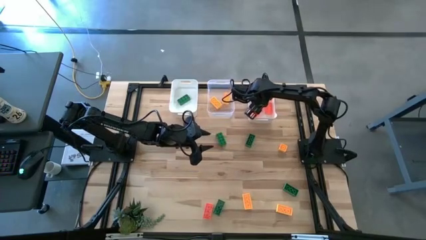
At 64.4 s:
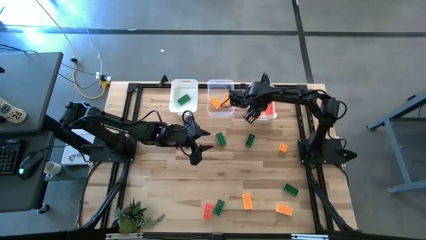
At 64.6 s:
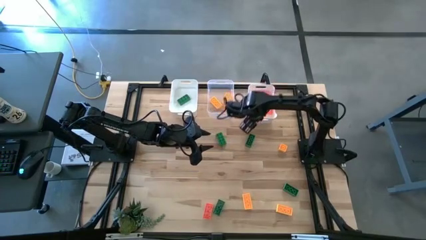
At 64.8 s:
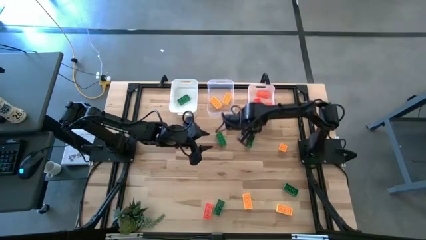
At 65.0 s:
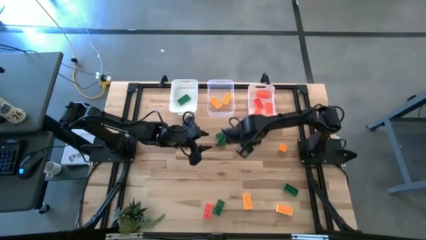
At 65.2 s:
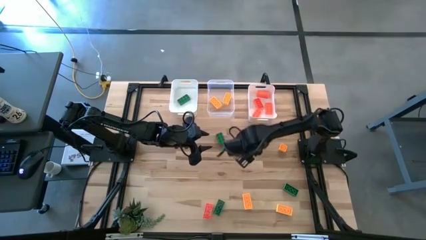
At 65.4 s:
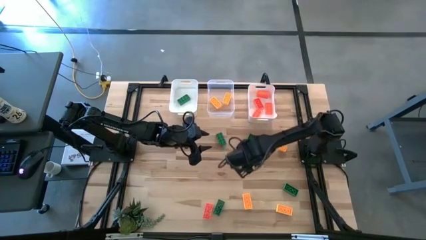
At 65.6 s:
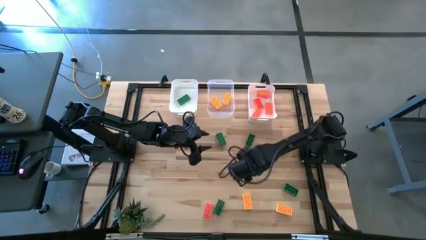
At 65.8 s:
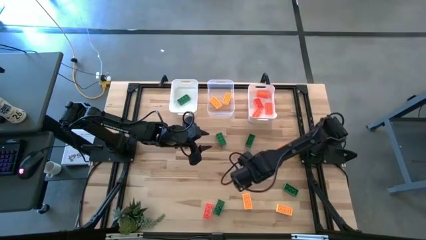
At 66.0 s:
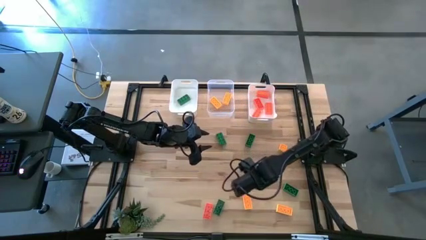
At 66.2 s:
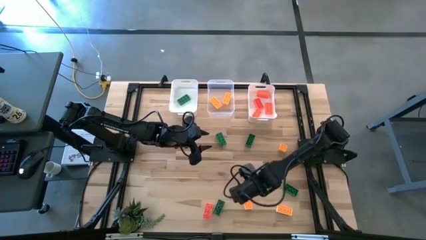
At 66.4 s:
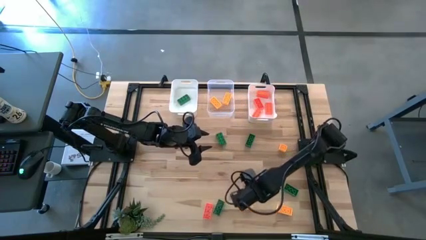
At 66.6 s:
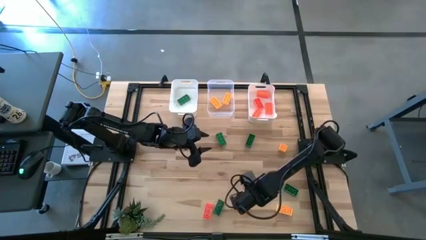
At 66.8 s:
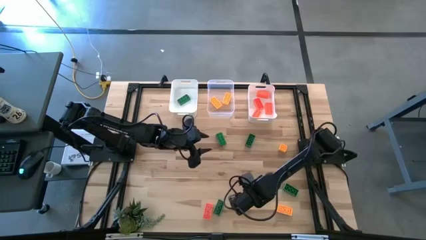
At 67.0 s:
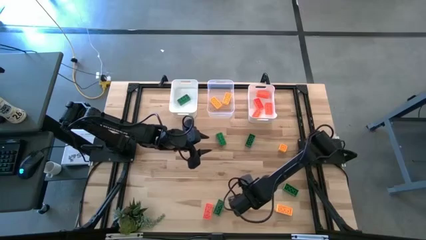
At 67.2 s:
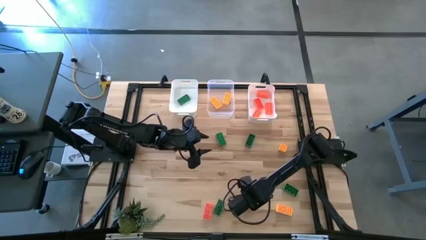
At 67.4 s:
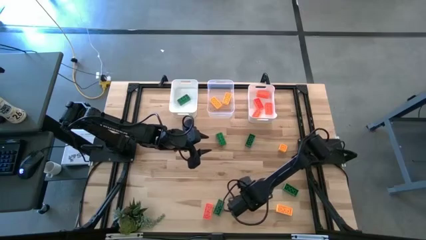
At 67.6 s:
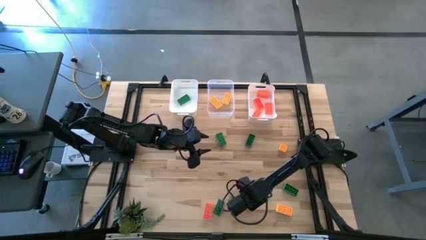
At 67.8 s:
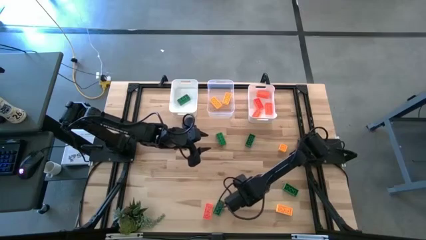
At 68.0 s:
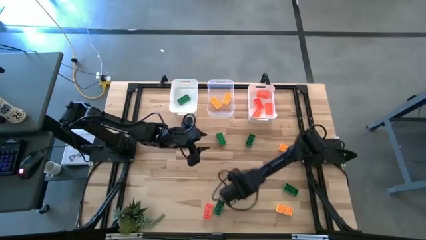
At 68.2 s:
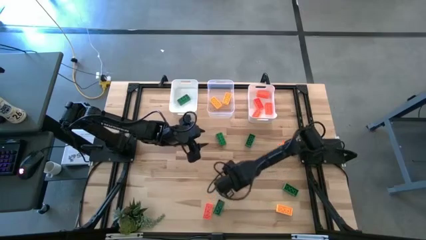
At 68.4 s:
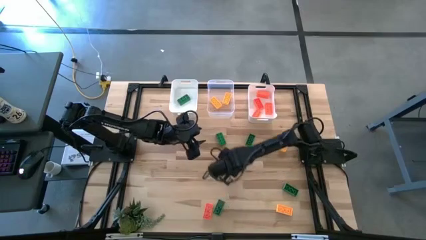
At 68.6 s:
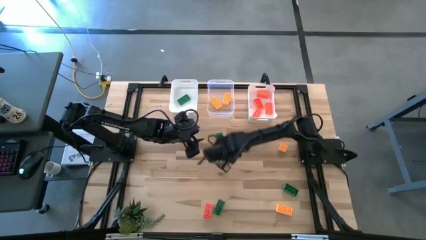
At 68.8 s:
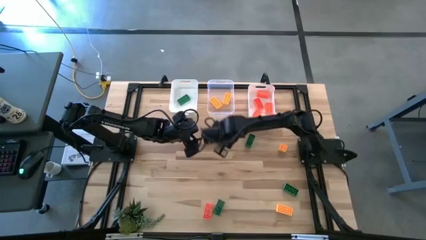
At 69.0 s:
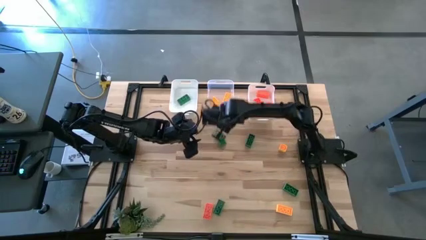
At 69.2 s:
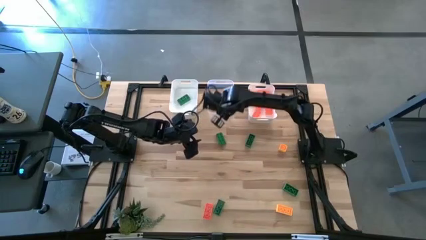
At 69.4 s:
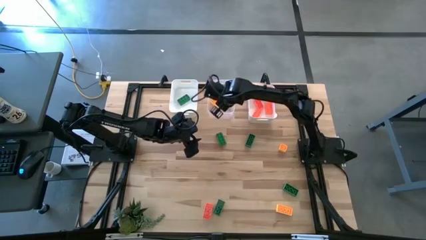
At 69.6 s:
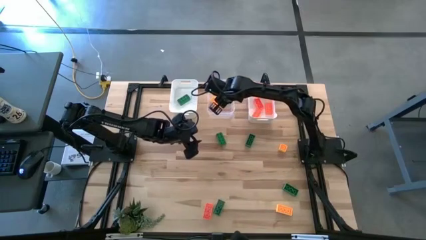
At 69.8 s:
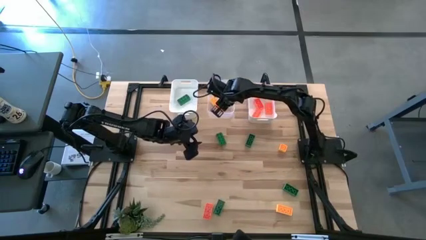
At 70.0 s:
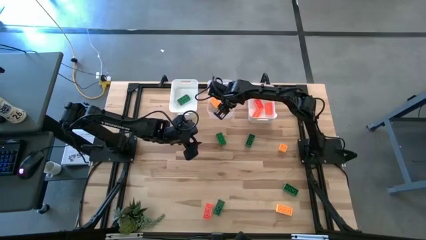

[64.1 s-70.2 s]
Task: Sort & place blocks by color
Put the yellow game piece into the transparent bin

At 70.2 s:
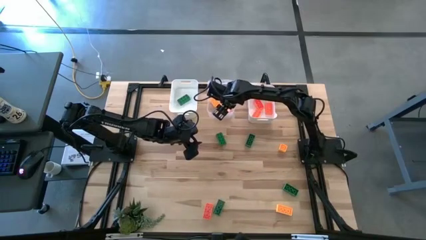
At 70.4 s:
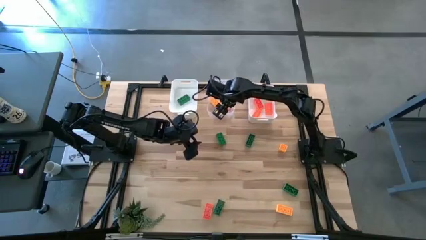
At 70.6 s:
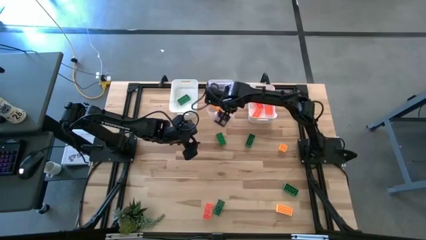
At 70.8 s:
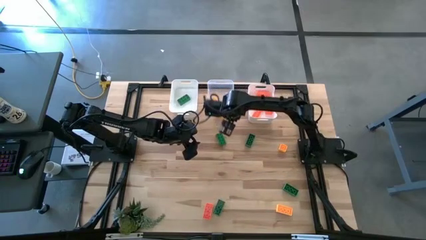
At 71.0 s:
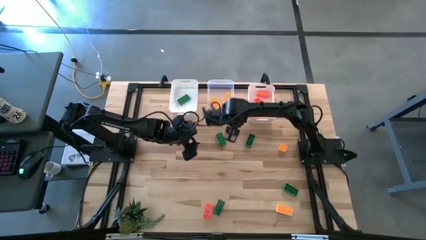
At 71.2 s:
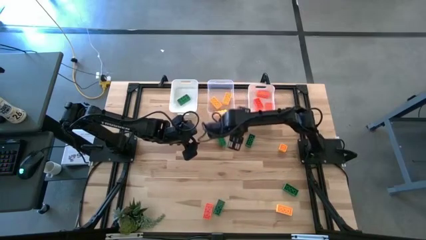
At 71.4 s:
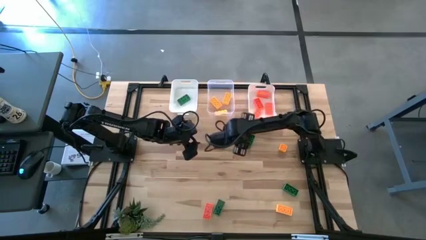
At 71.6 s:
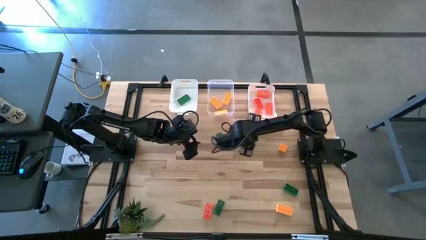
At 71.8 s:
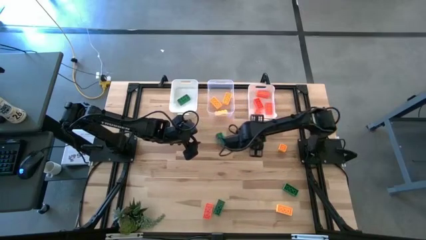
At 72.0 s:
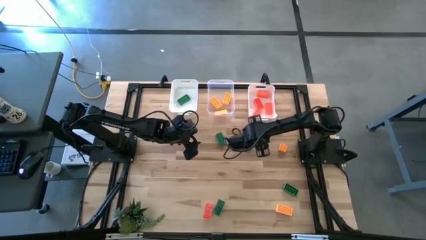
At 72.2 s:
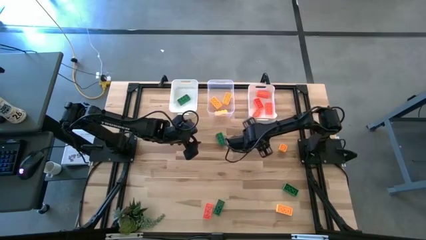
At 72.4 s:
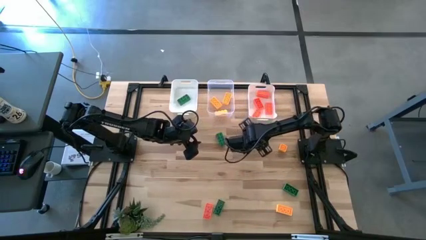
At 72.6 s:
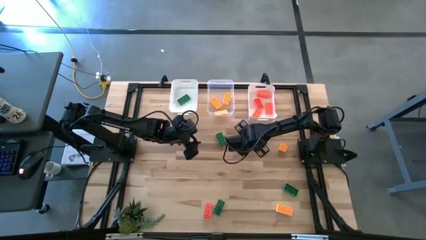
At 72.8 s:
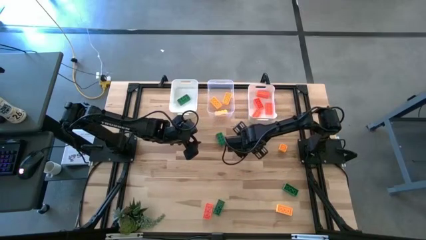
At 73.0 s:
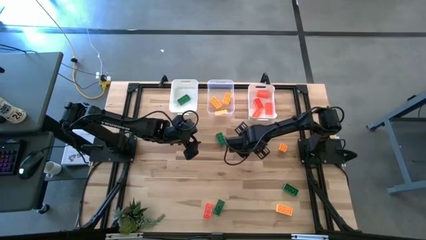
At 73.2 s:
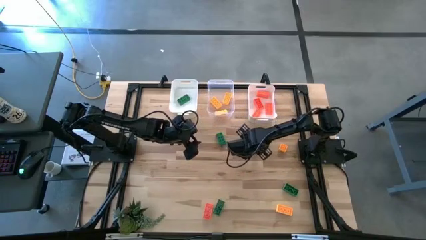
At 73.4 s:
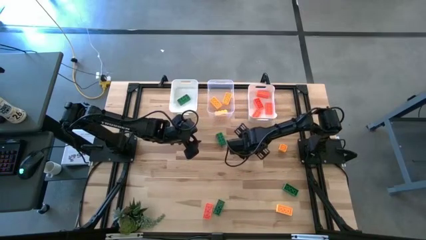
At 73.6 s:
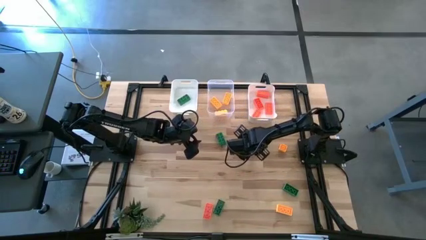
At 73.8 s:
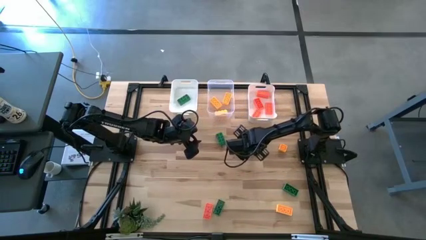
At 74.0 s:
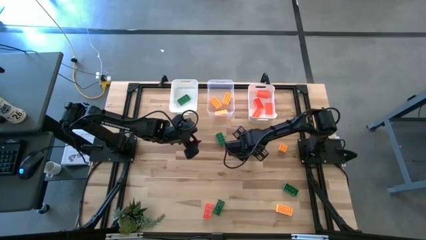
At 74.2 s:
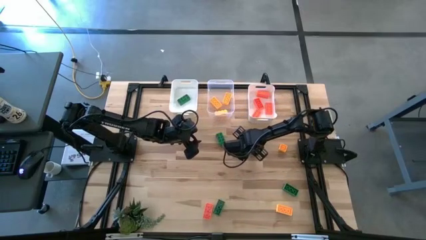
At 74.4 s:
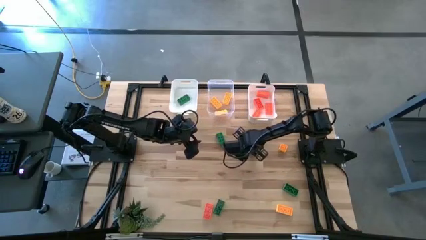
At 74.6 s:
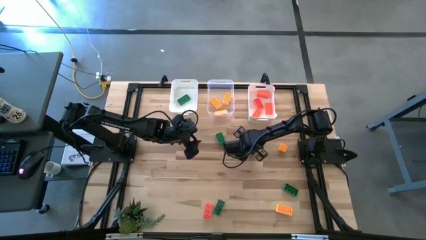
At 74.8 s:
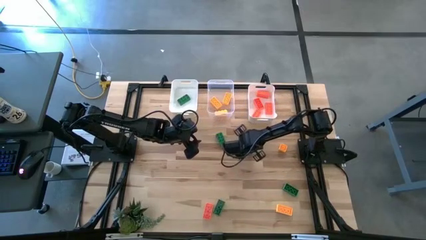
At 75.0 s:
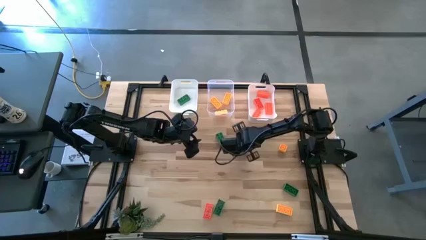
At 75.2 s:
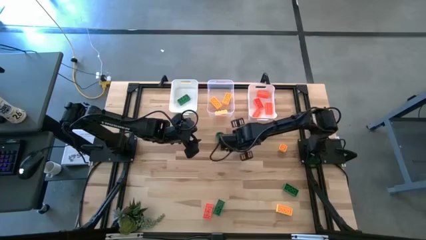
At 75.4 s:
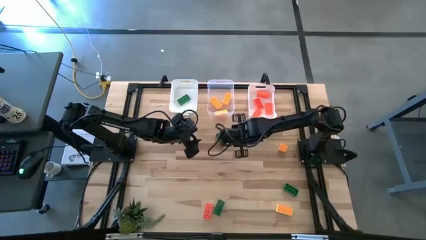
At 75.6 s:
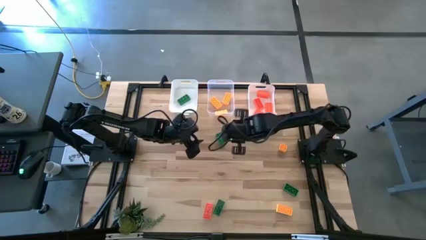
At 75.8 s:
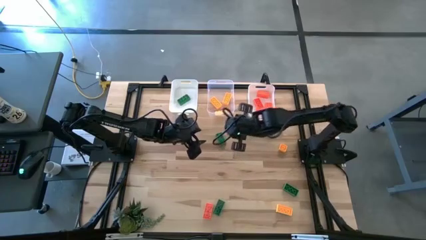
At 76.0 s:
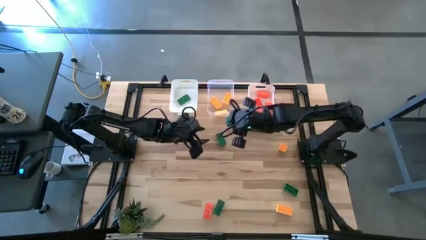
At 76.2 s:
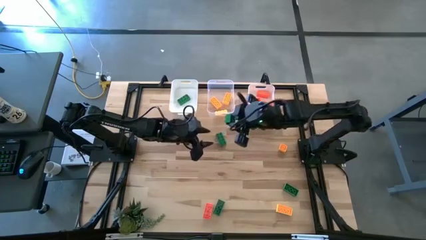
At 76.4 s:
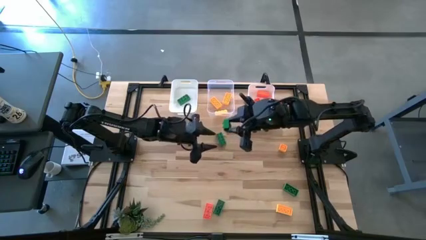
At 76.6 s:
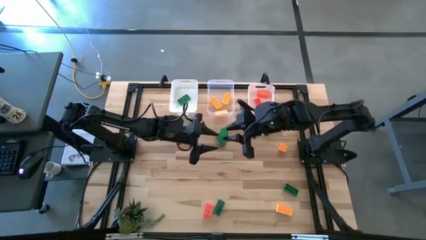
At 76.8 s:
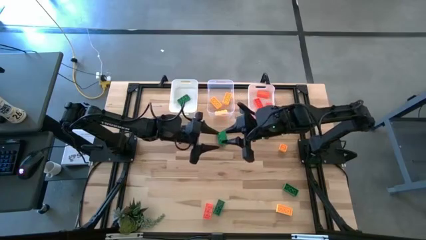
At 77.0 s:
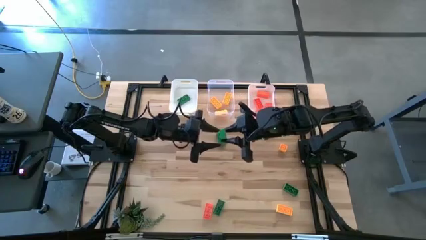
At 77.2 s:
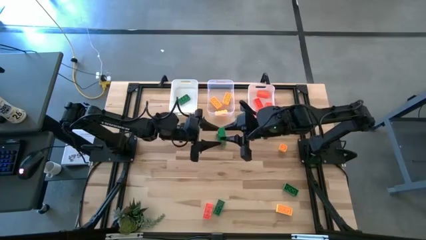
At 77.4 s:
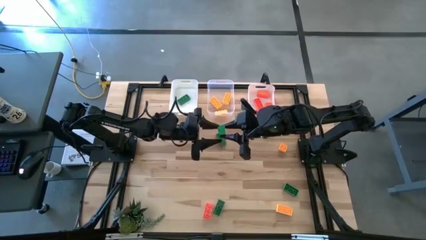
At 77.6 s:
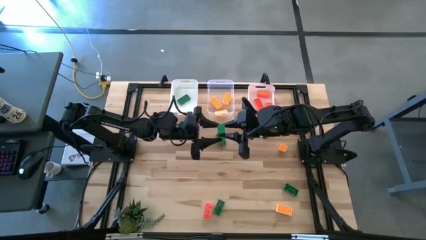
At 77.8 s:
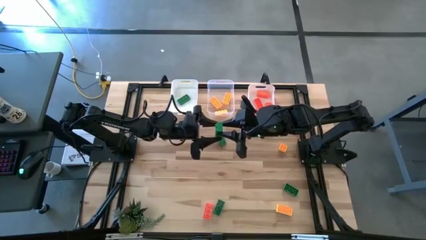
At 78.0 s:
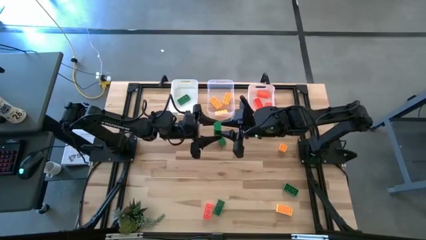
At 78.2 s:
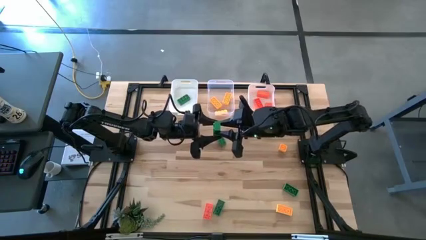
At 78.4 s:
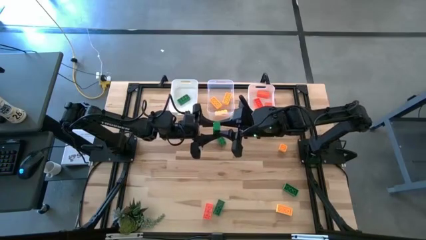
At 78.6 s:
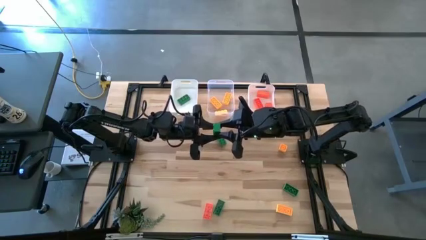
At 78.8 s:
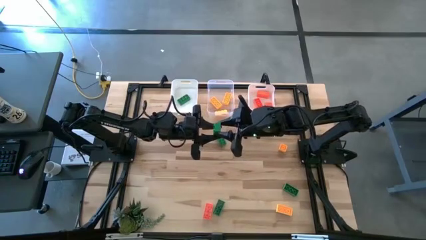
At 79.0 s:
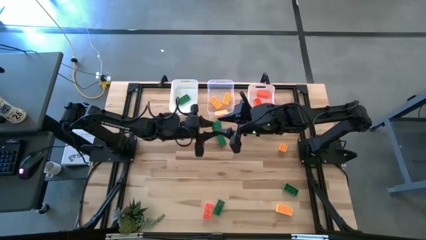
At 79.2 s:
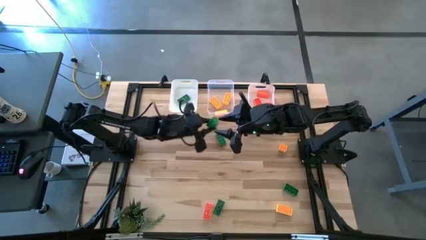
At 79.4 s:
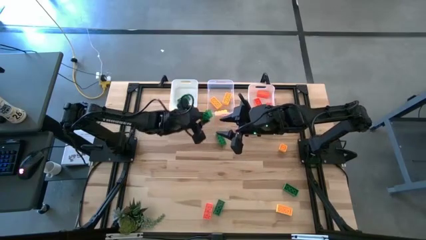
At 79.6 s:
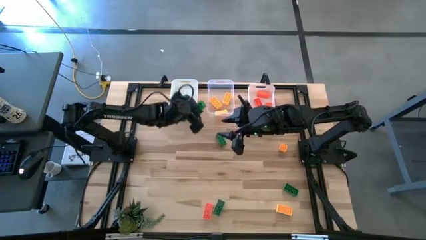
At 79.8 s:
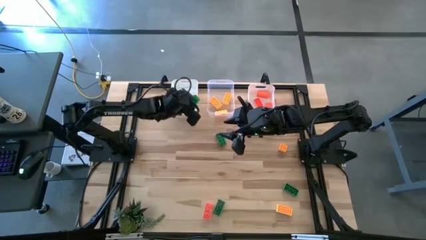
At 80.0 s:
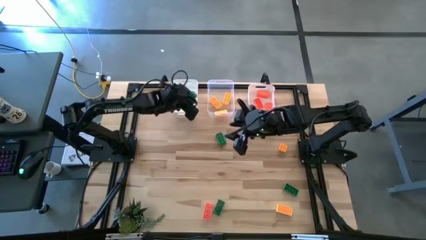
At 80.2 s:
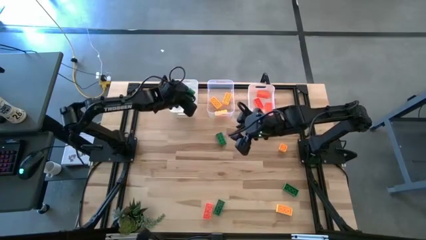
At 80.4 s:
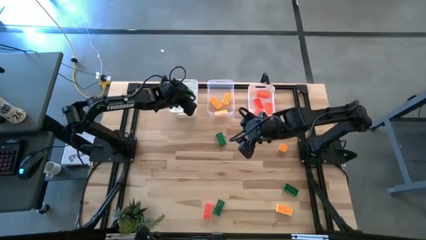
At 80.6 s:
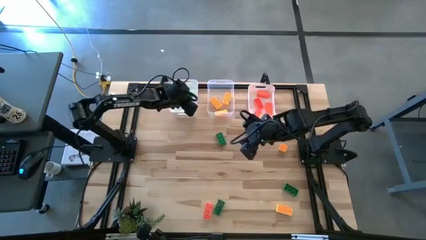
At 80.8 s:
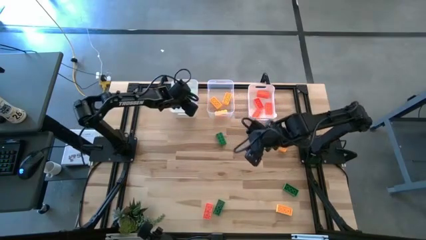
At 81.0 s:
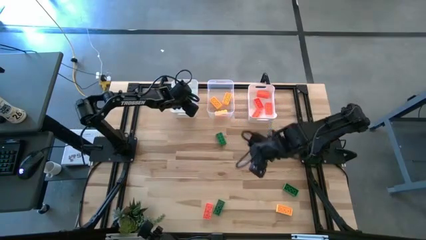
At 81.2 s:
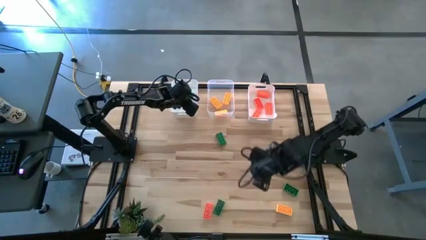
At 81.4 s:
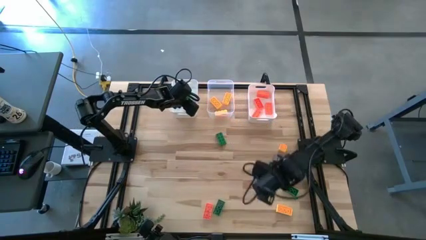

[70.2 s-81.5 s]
Put the green game piece into the left white bin
